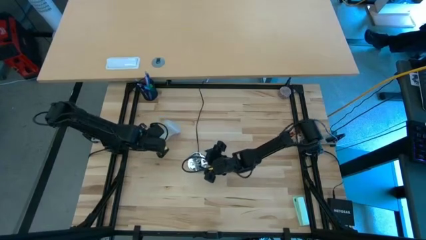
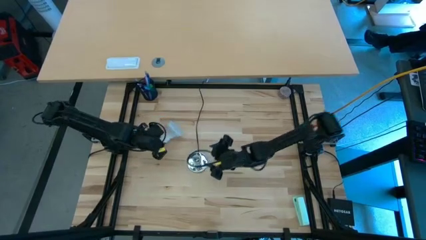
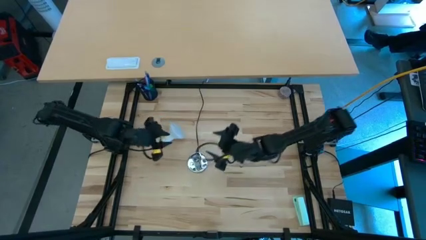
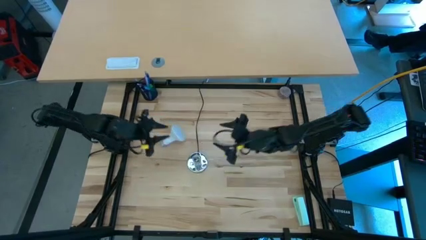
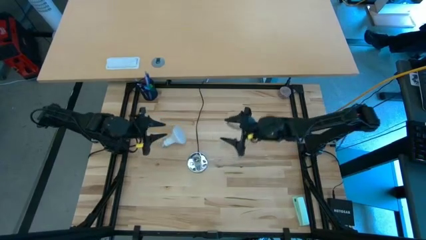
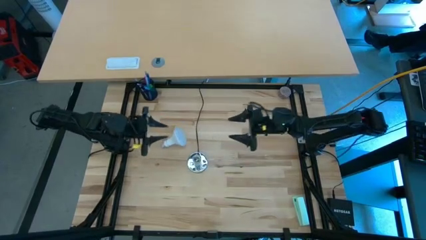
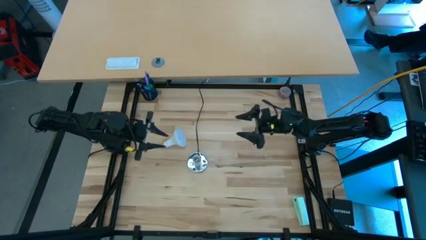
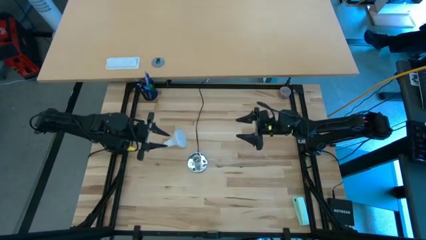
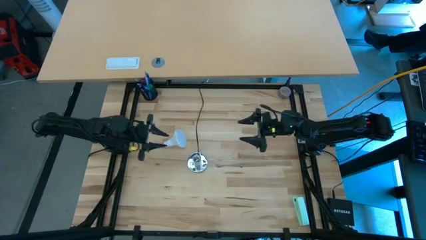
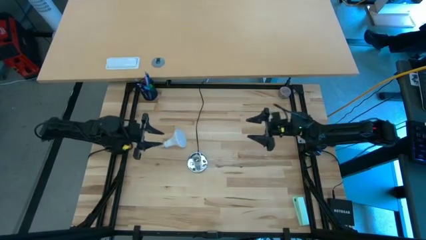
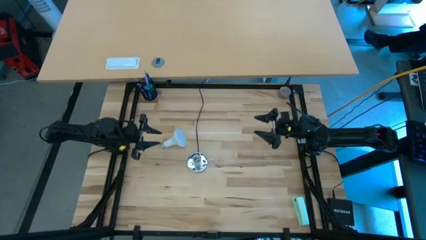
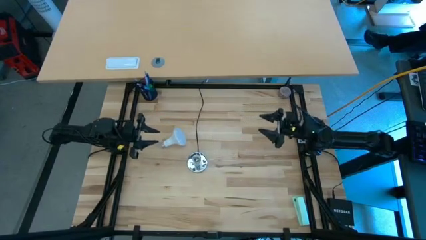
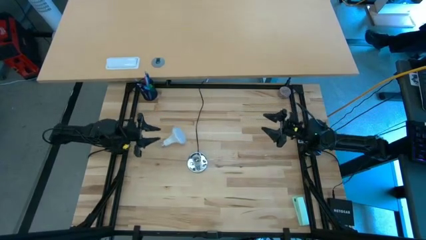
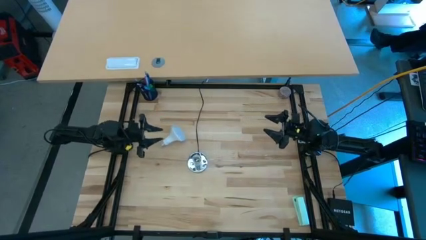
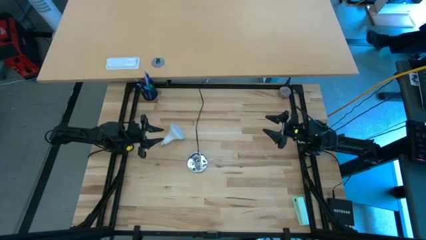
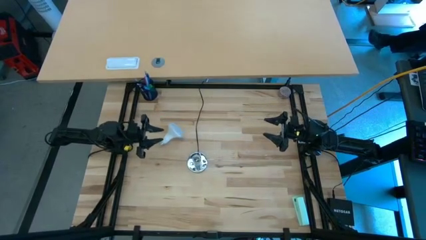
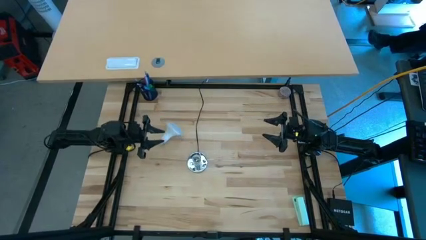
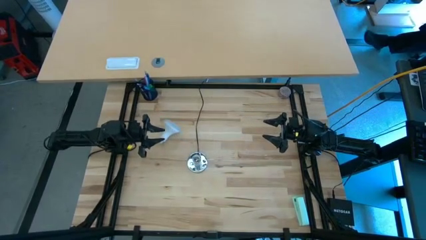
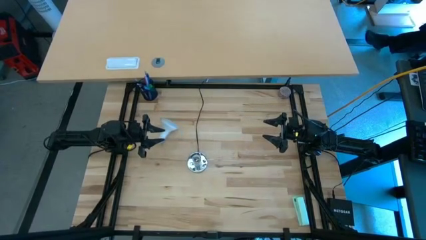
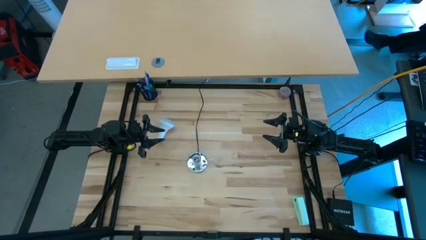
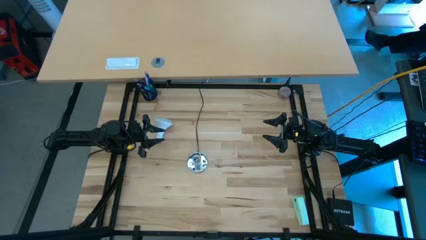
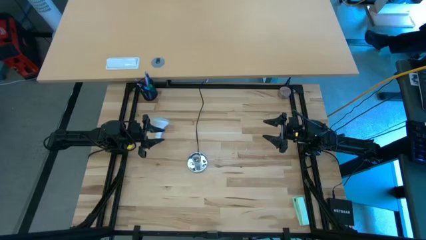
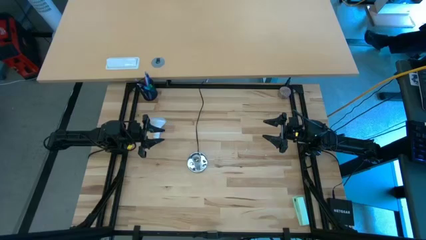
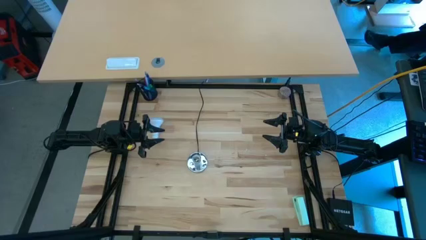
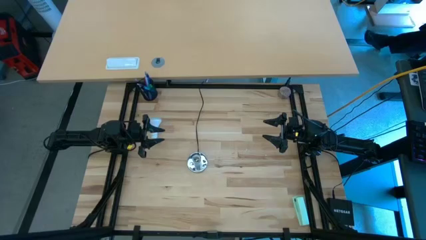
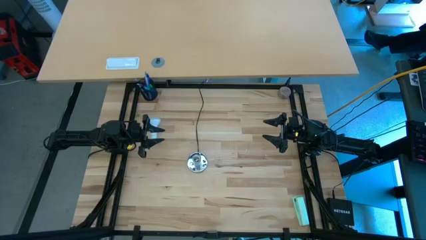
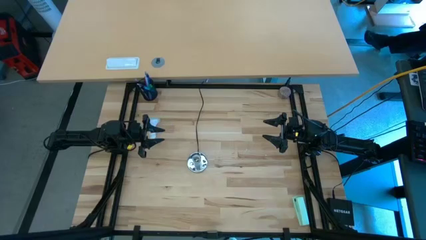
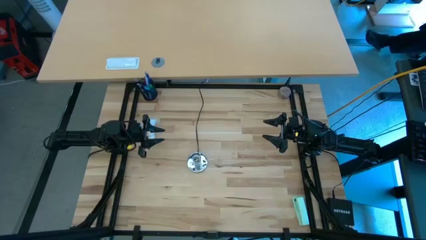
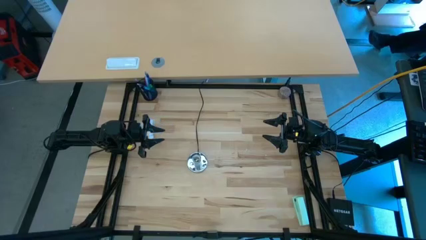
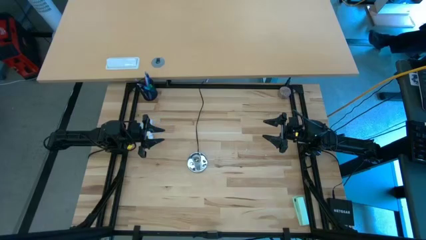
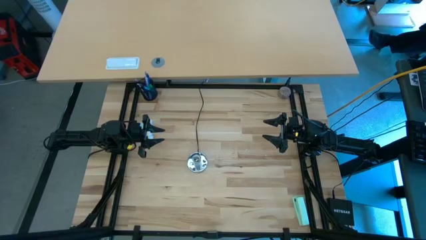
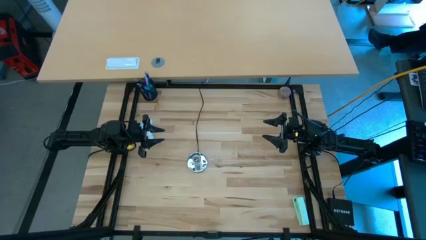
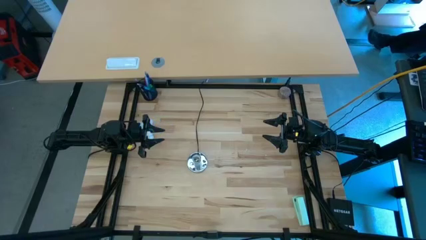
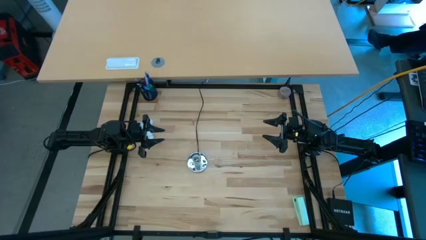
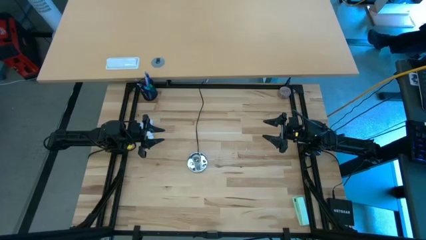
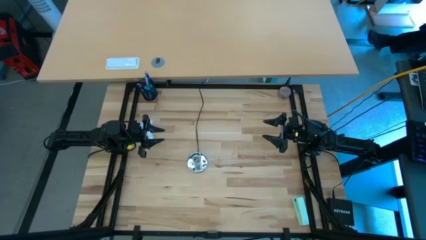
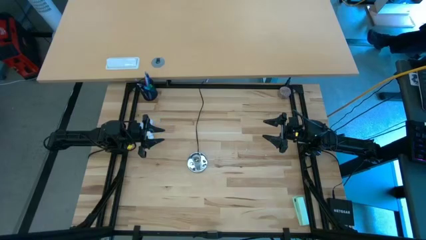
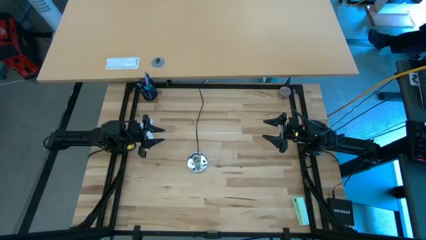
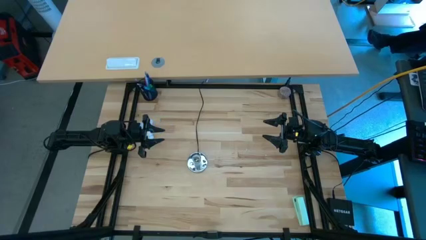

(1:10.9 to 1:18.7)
Task: Screw lightbulb
Return to Home Position

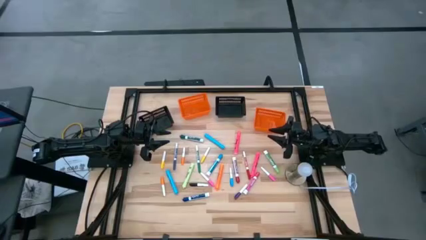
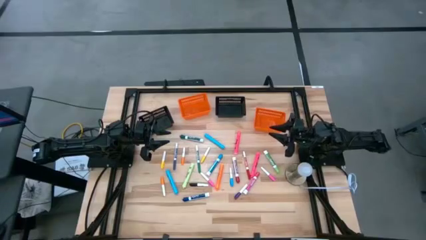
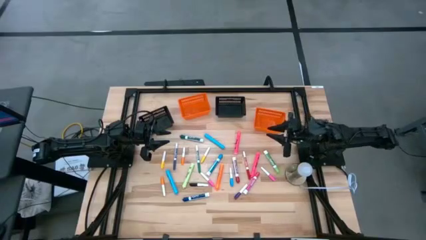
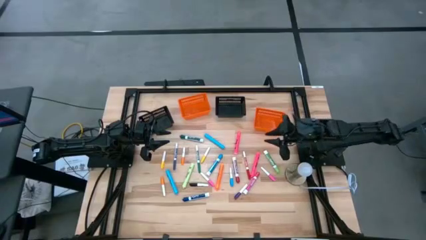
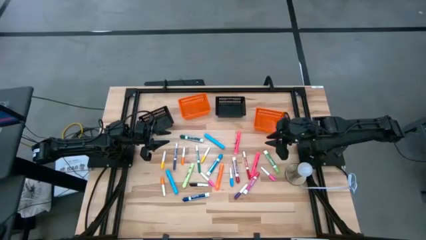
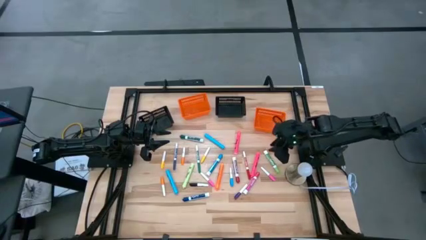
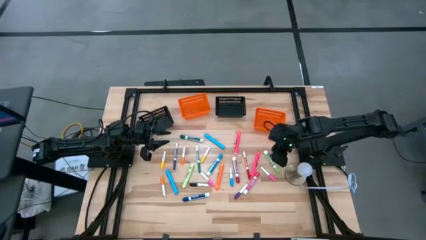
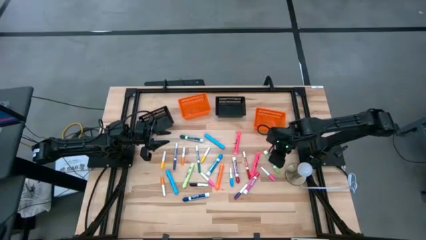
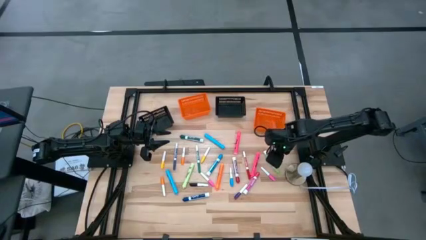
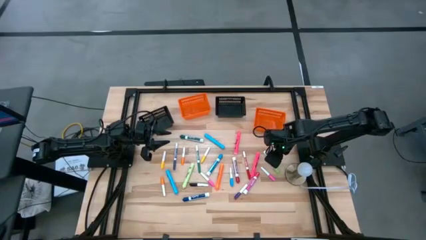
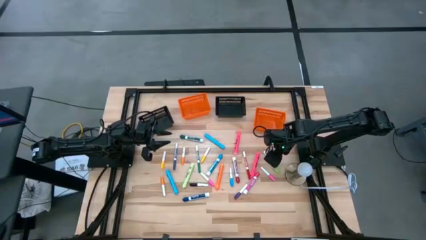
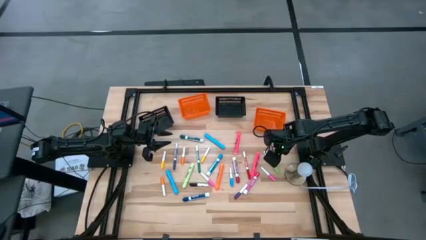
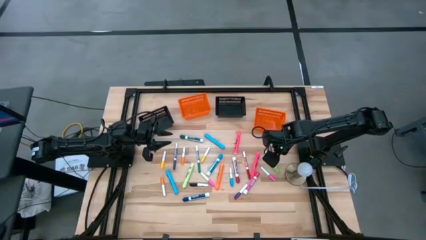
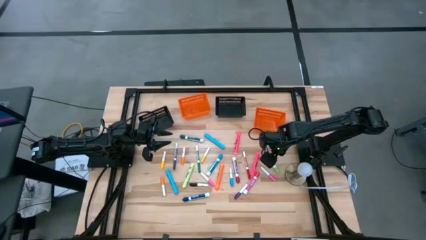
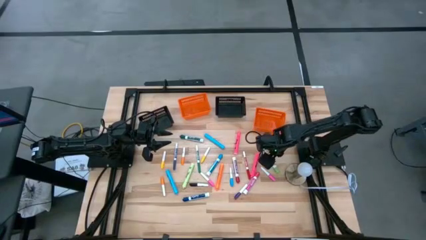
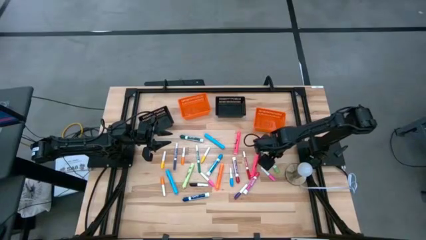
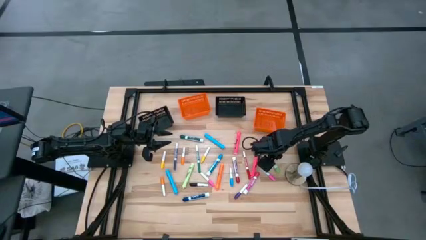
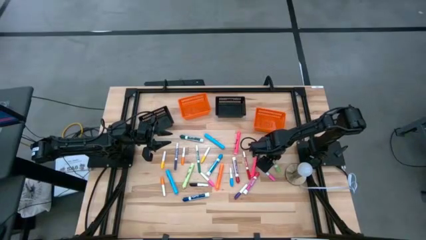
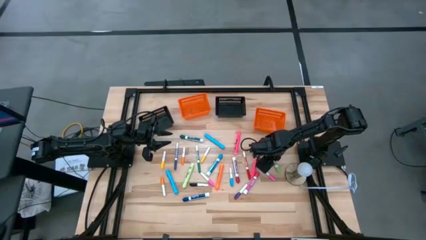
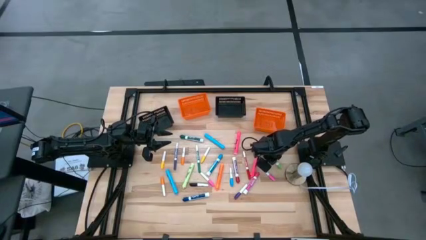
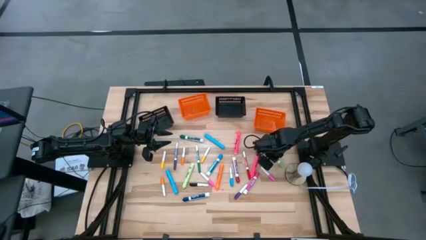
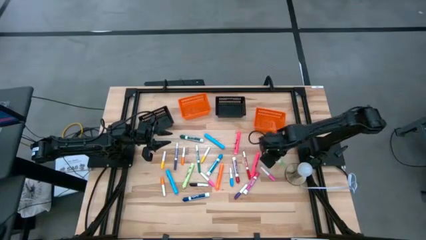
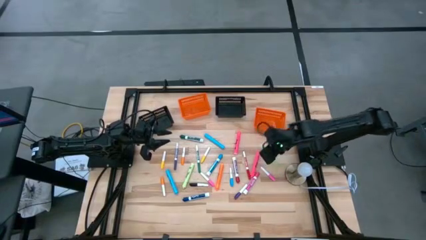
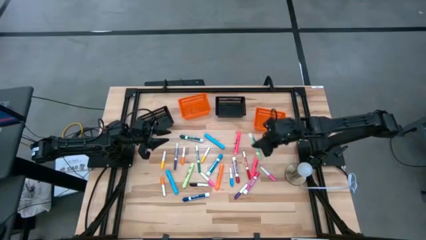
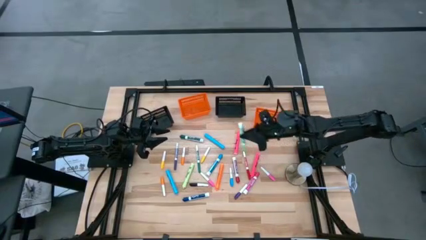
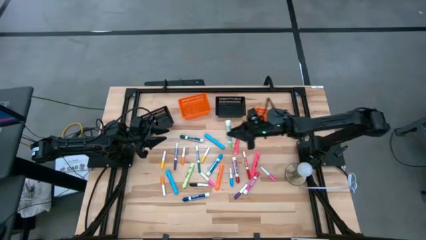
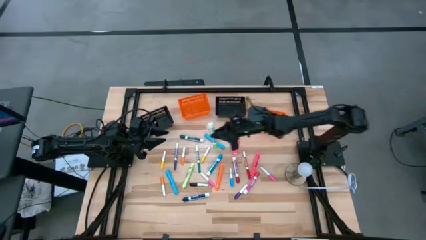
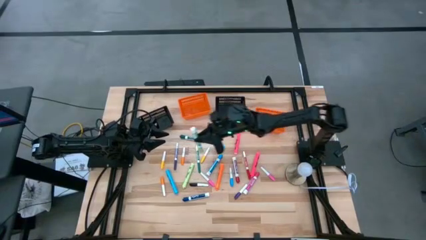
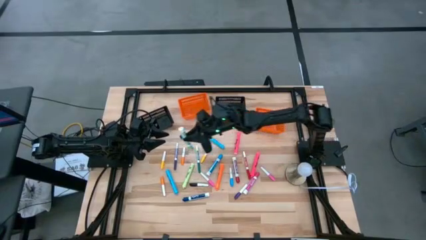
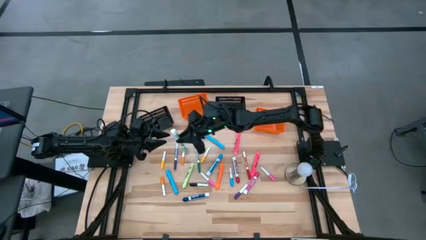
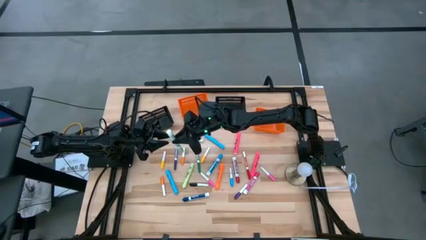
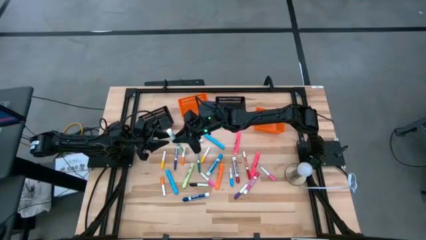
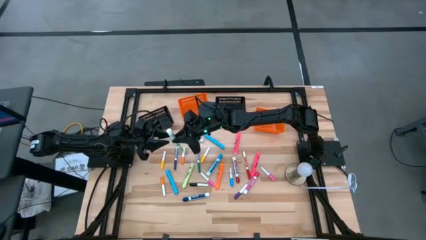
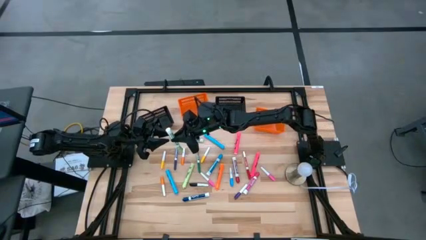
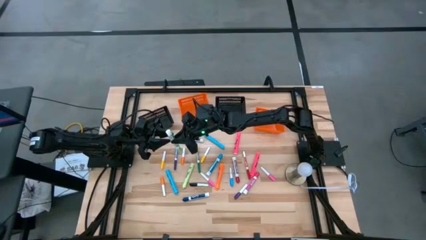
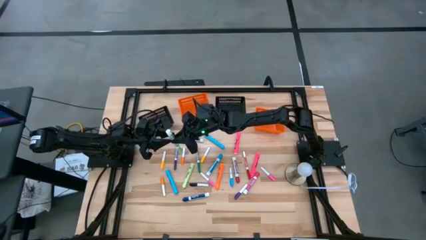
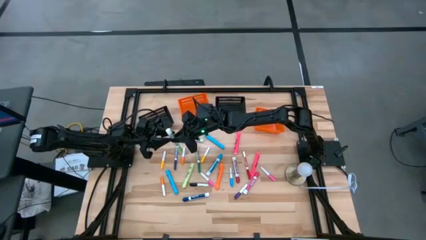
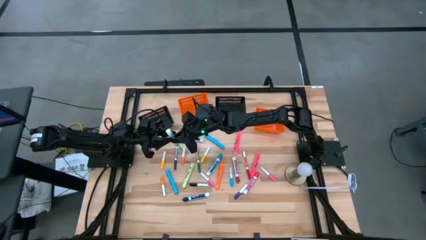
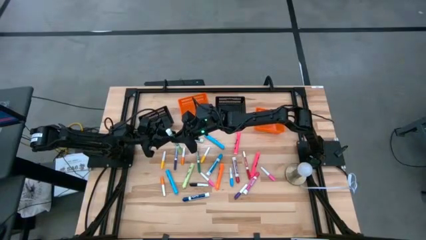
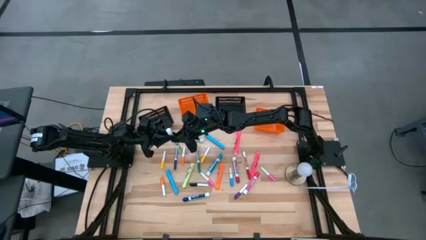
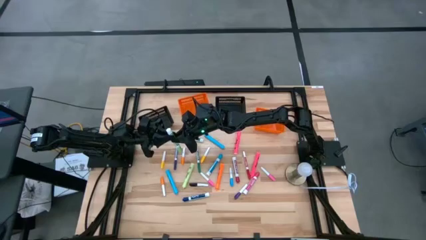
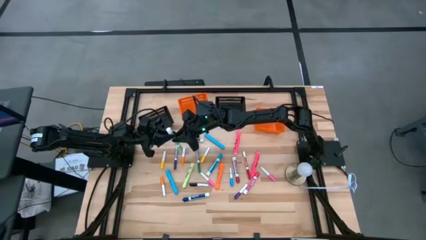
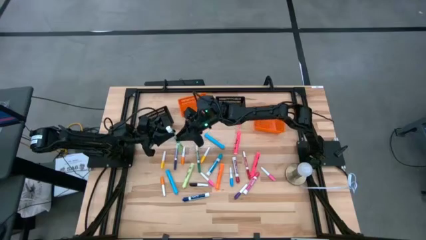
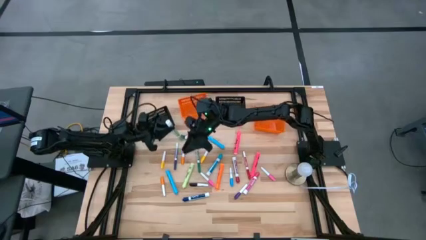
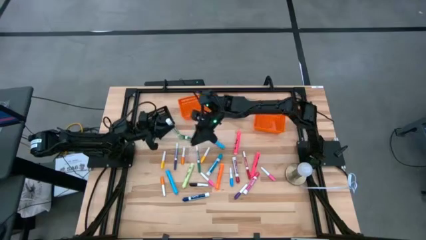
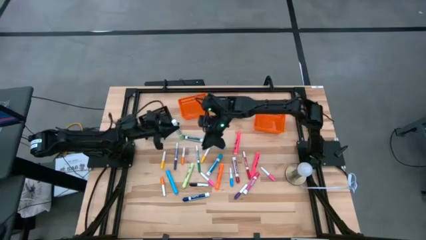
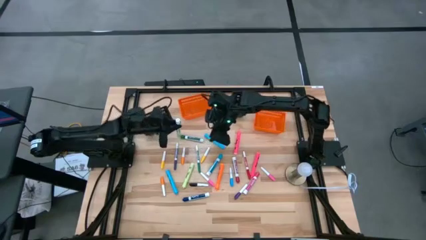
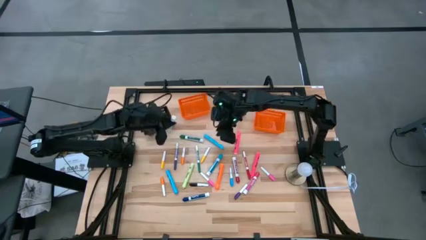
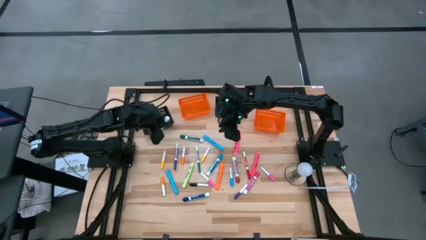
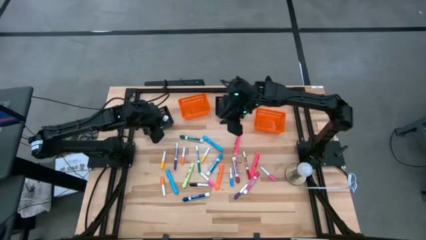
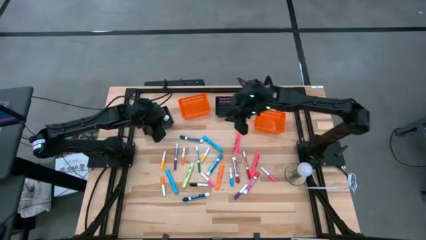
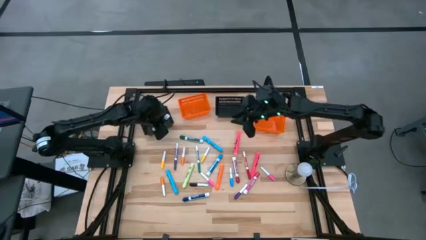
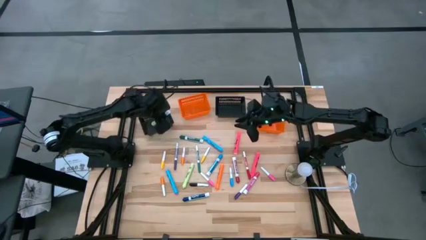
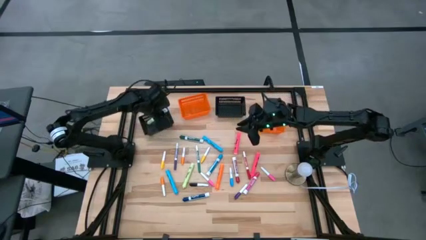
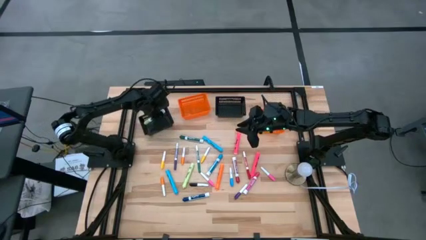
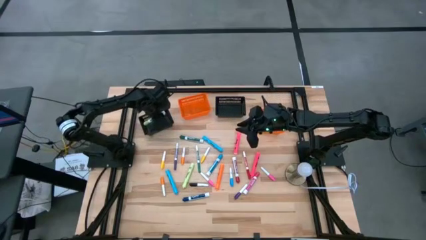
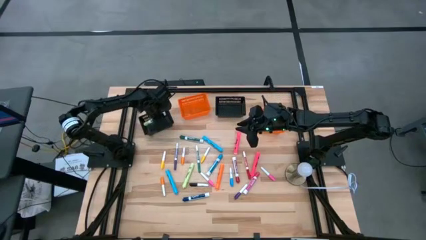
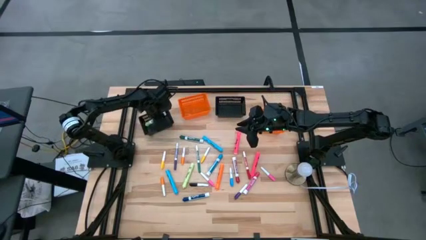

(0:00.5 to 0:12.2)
Task: Pick & Place Markers
Put the large light green marker pen into the left black bin
